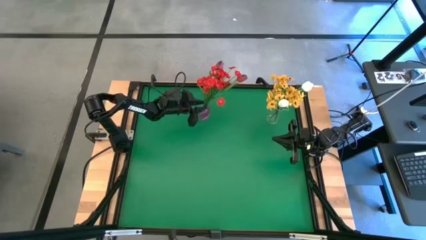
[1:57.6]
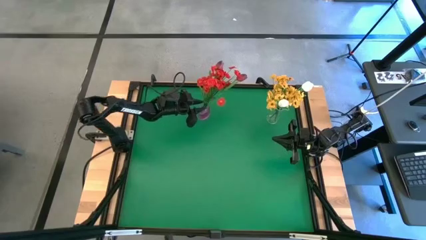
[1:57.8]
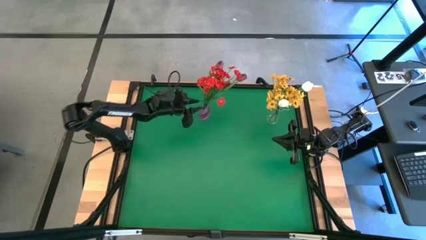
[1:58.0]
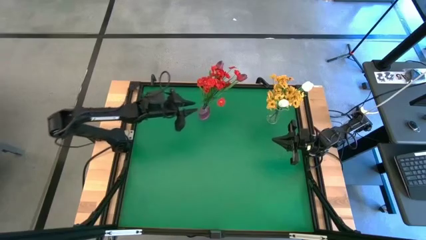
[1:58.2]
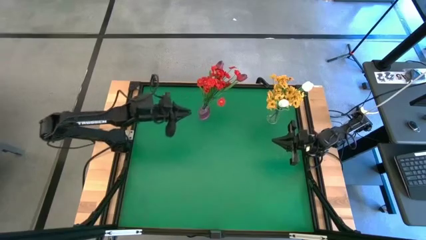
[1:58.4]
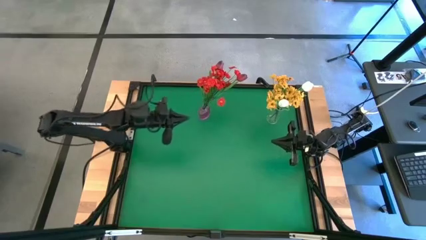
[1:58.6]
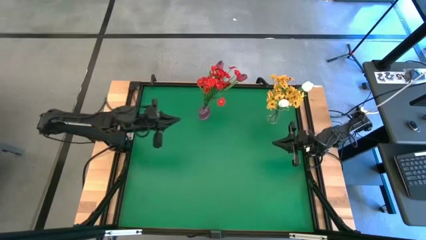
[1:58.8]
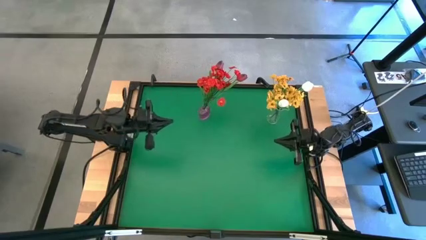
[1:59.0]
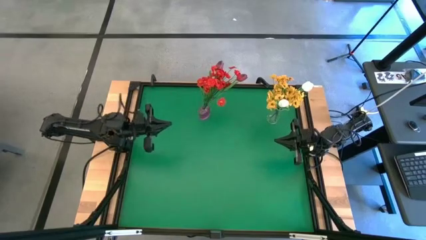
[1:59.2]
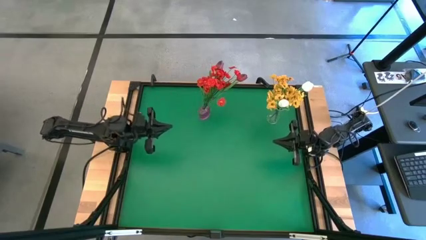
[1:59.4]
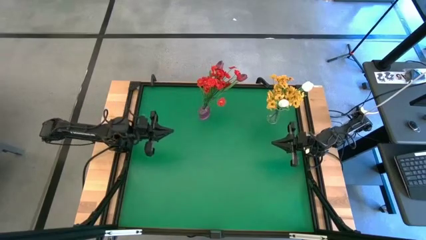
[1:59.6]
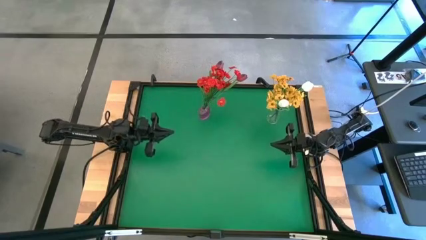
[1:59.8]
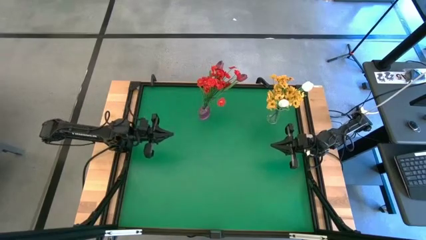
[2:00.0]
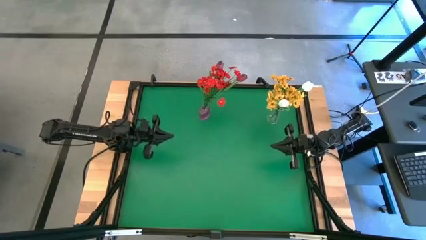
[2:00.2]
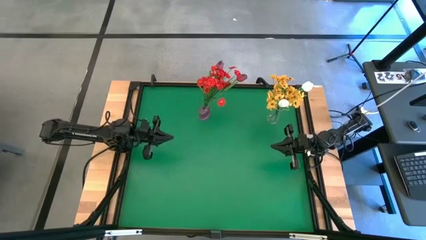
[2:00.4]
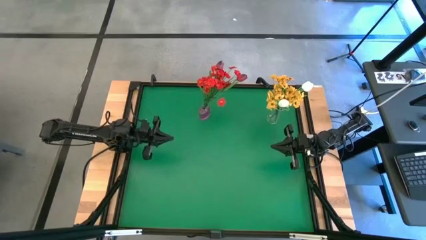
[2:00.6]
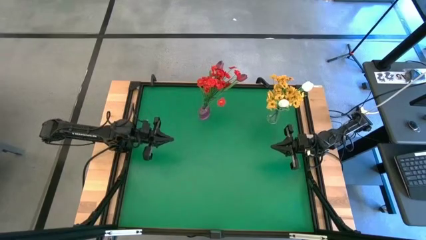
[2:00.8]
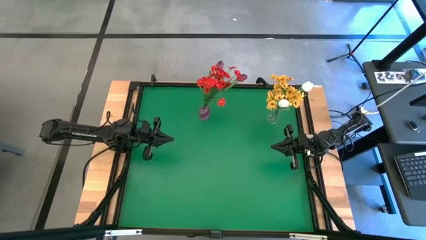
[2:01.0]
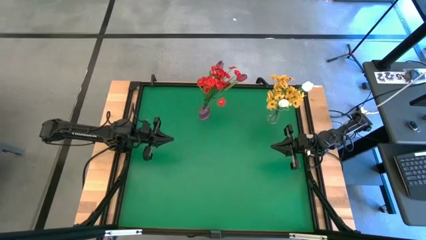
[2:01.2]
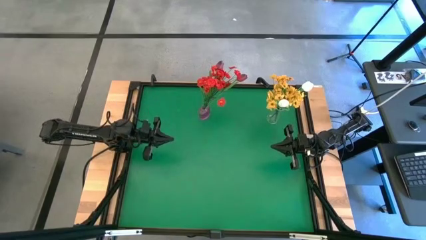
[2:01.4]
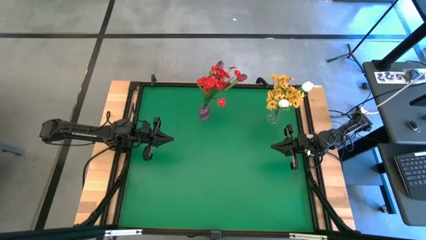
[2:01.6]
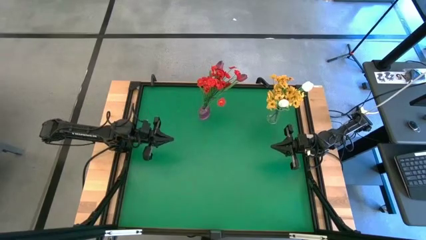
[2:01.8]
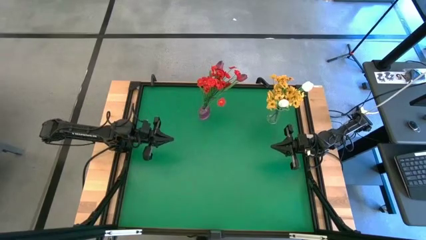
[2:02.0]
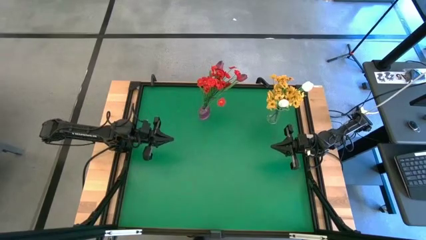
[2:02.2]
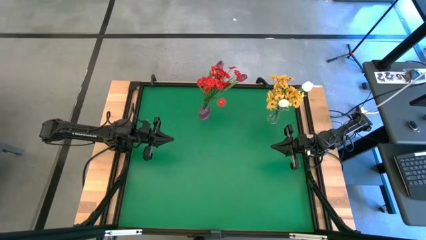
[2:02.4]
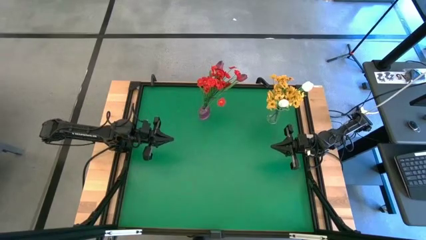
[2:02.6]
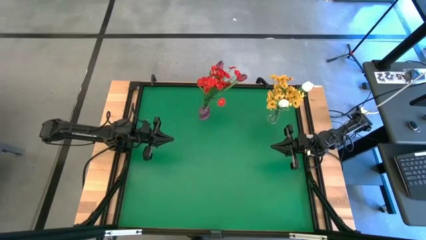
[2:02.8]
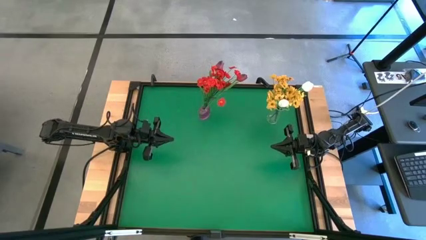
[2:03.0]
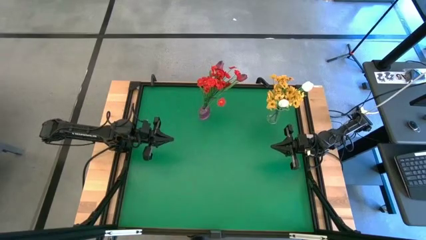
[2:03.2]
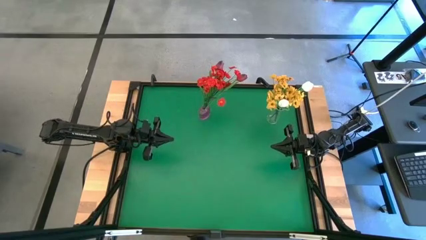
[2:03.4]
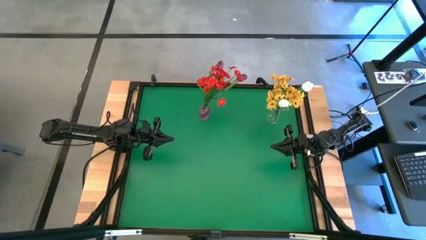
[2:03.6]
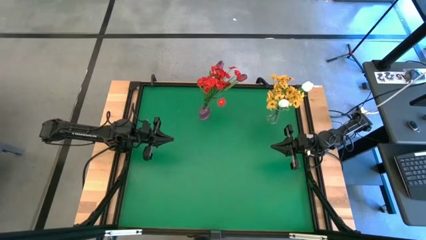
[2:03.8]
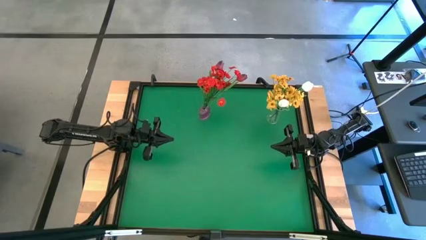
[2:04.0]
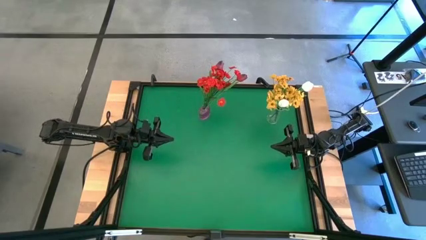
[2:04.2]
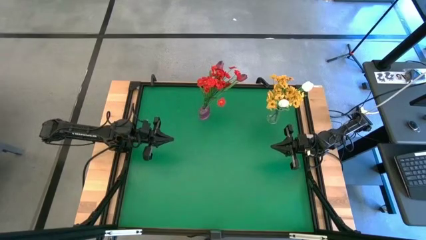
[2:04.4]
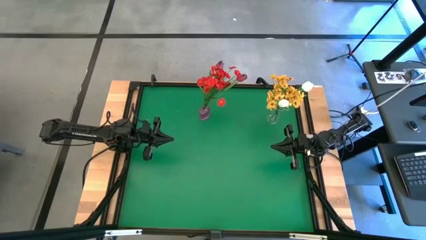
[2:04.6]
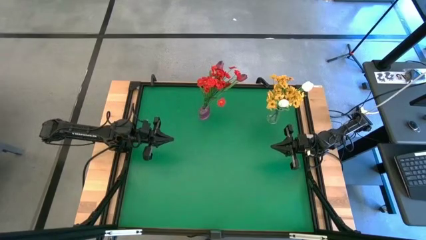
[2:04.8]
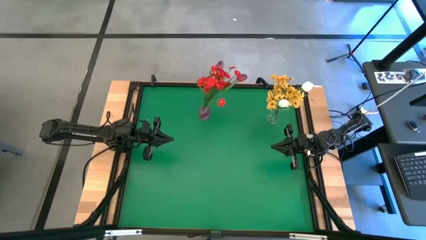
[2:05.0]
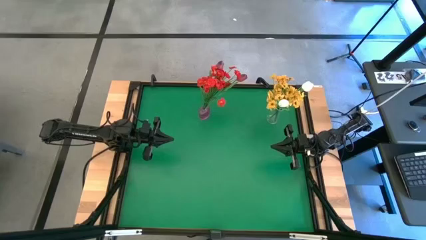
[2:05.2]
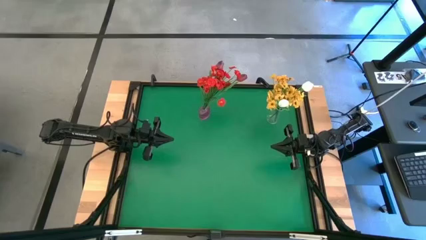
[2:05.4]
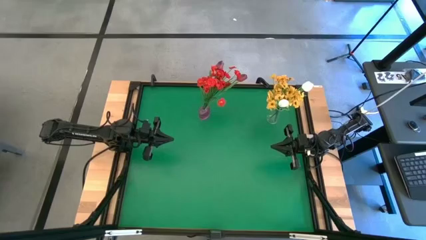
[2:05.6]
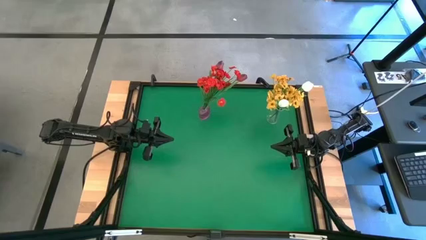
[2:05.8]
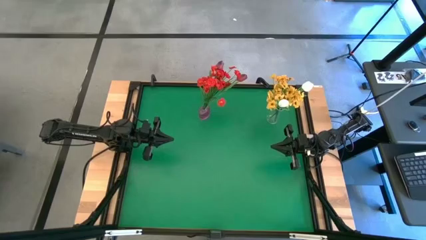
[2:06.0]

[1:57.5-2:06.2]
Task: Sort flowers into vase by color
Return to Home Position

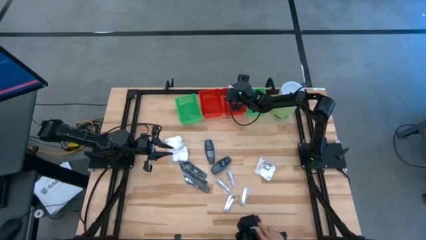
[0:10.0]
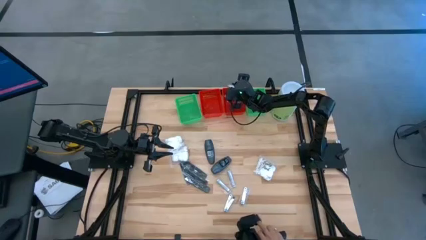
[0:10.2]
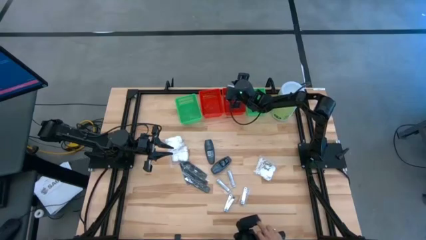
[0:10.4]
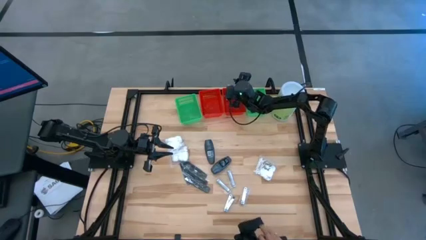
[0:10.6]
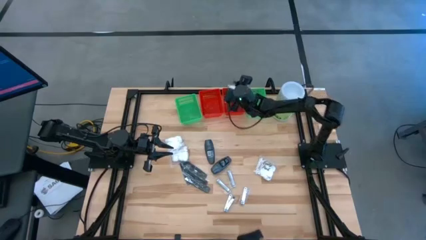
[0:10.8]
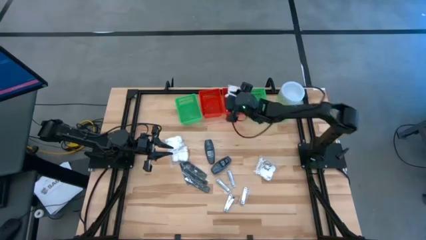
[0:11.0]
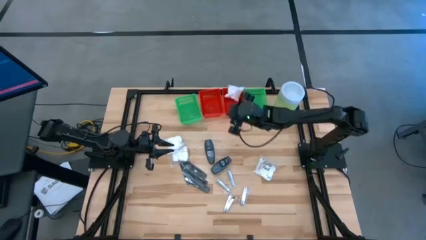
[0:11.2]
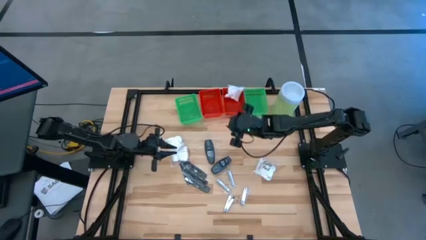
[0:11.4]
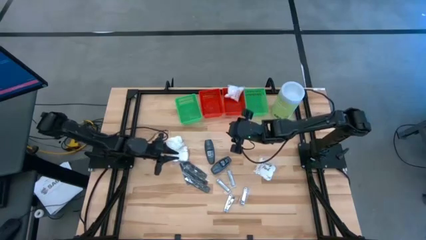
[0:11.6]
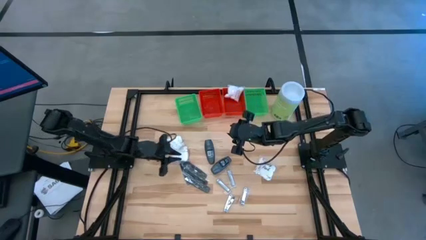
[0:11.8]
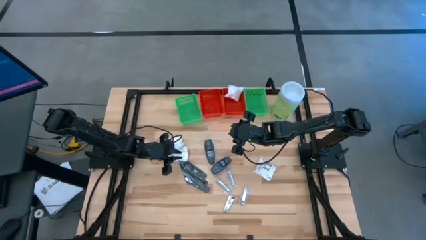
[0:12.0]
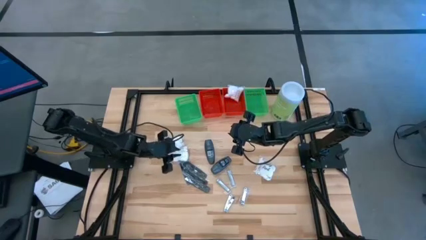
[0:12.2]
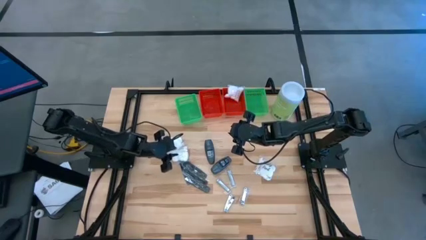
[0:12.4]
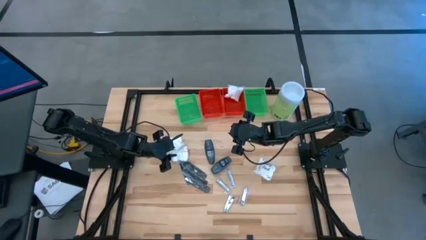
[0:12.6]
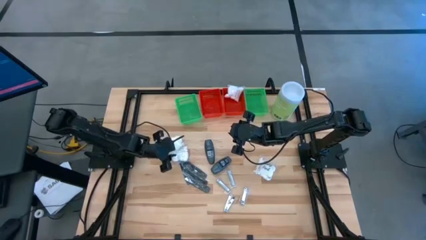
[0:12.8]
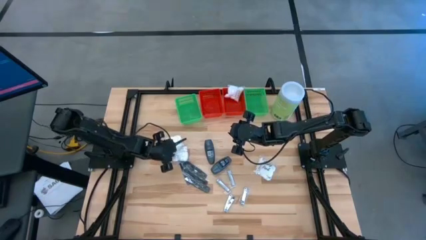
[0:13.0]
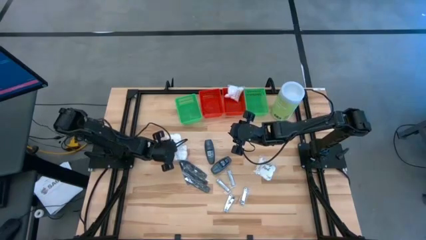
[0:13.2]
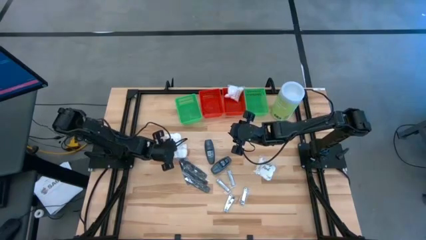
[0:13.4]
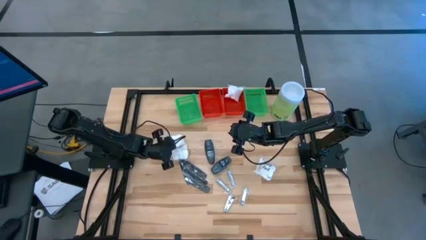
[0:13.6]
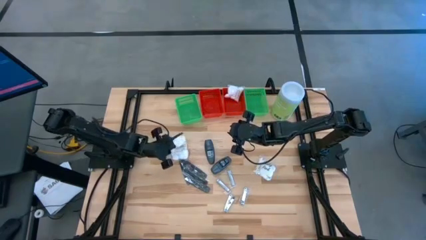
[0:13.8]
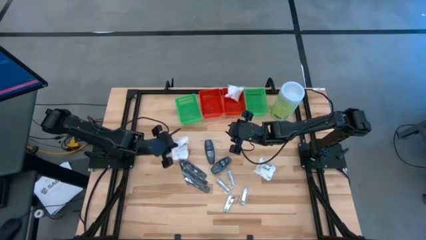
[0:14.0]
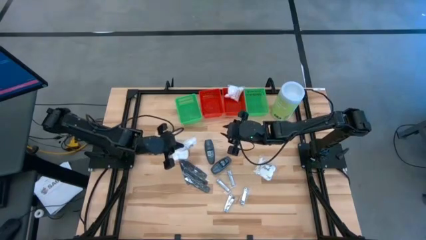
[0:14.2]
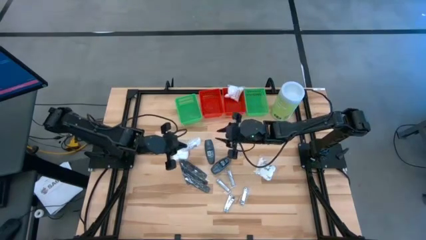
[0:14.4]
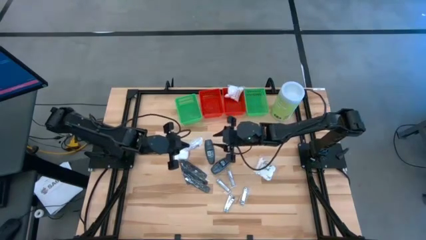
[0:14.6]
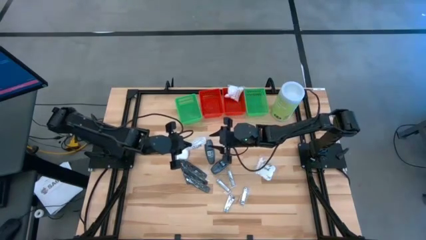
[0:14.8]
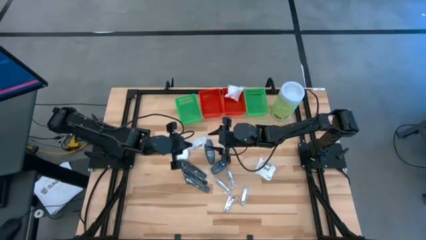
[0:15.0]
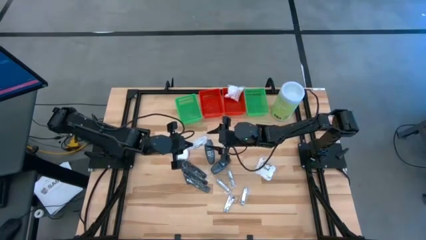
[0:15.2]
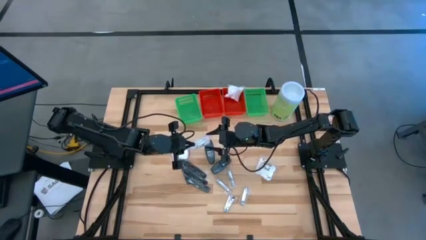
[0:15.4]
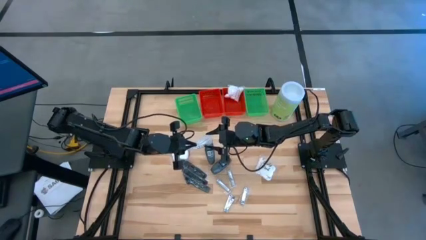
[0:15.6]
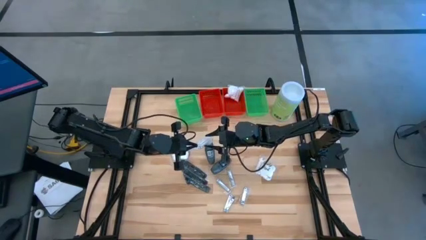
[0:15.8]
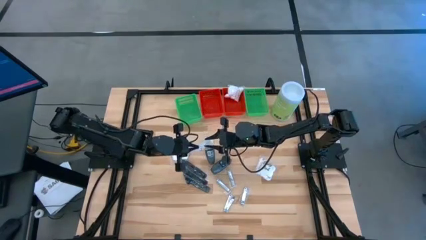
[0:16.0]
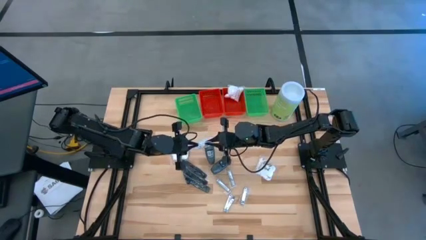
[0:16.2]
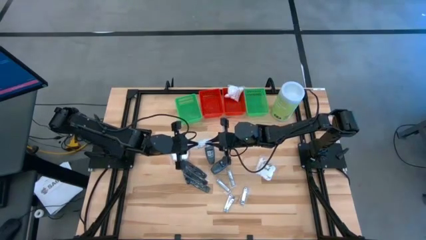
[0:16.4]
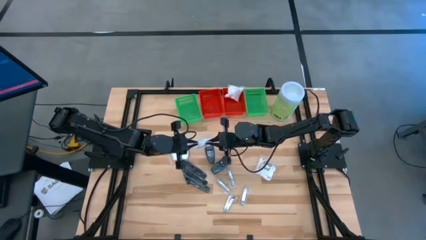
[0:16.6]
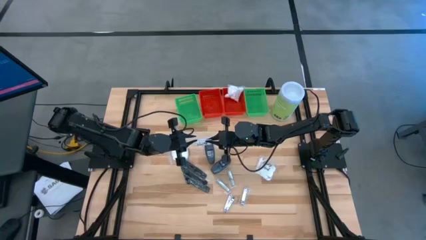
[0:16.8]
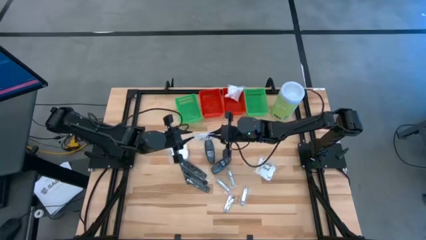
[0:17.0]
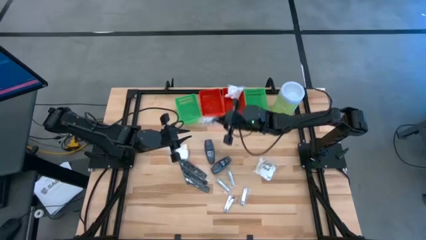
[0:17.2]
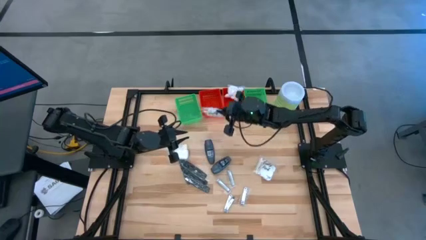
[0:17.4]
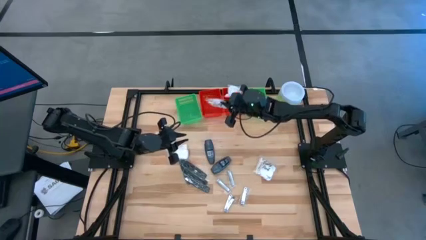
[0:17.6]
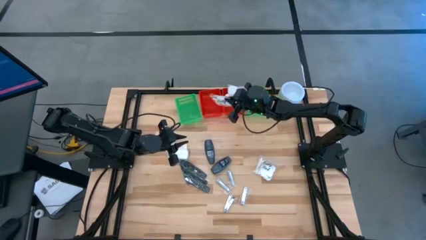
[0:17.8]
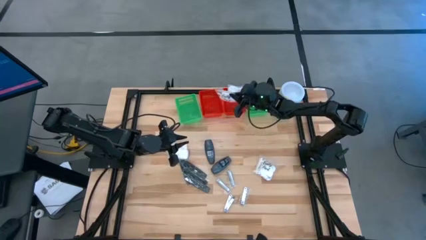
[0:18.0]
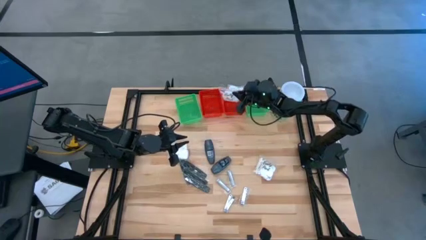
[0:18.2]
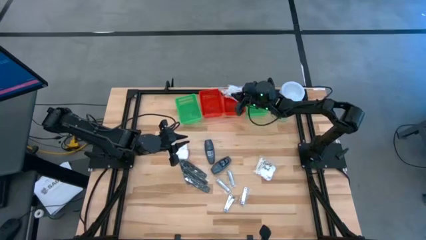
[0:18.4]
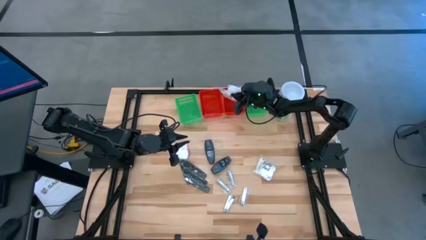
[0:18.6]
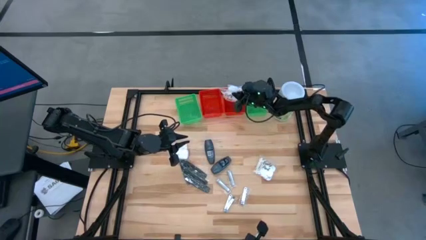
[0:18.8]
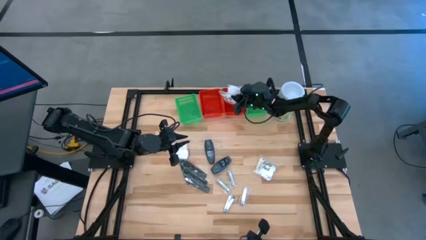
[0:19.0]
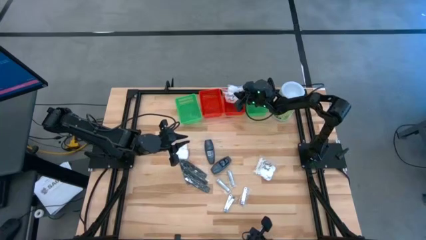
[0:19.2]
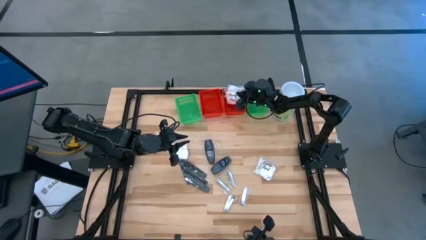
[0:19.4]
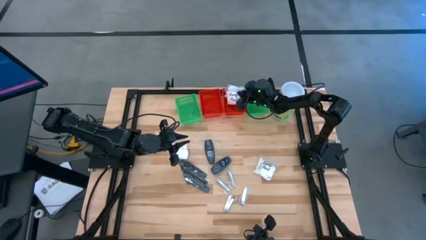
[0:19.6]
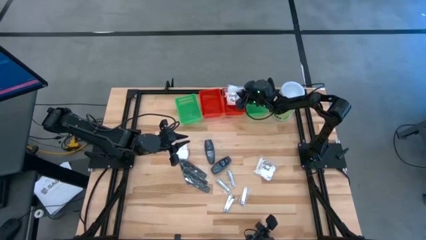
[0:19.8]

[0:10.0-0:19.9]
Task: Pick & Place Travel size toiletries
Put the white cotton pack into the right red bin
